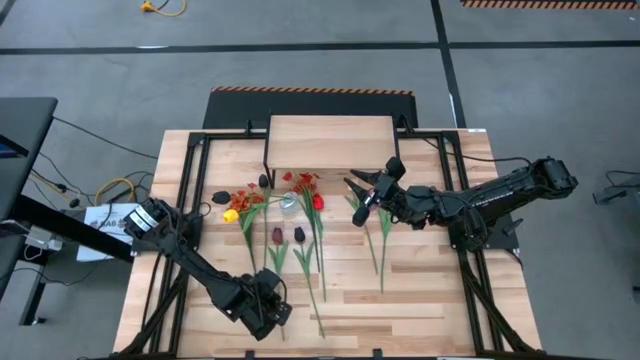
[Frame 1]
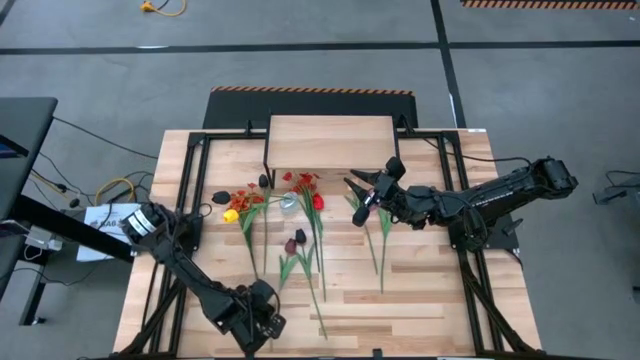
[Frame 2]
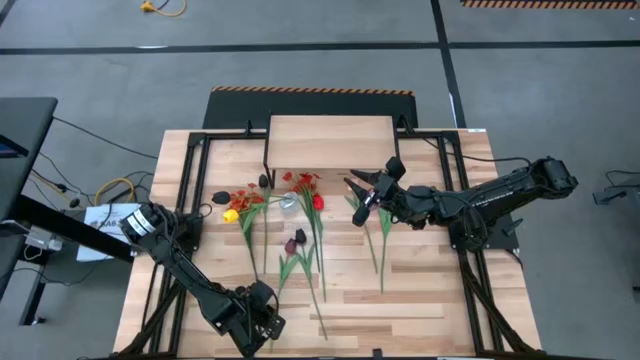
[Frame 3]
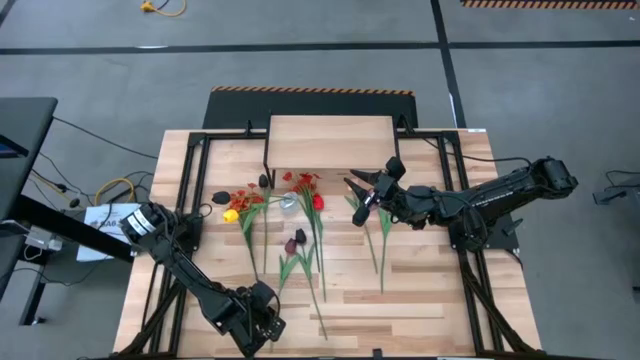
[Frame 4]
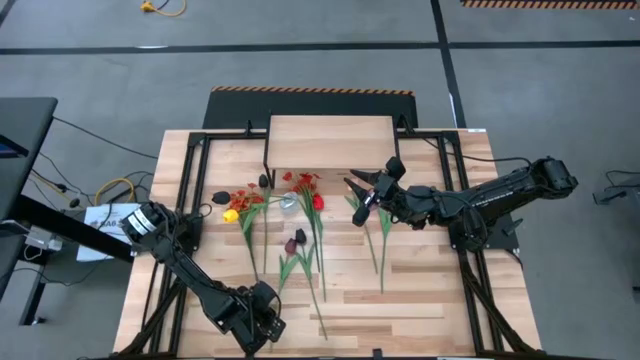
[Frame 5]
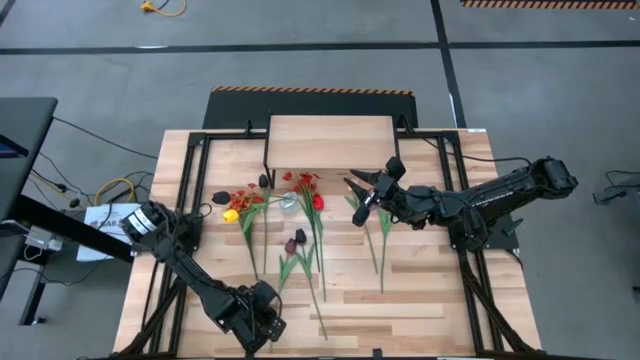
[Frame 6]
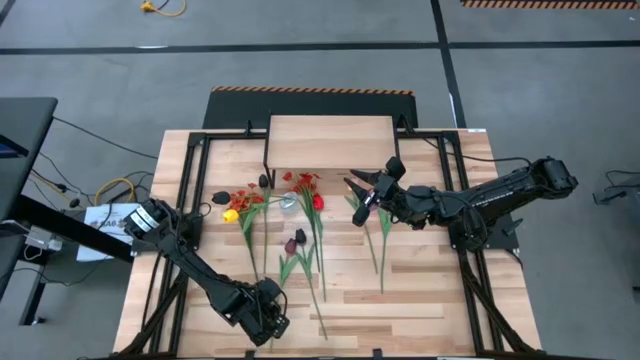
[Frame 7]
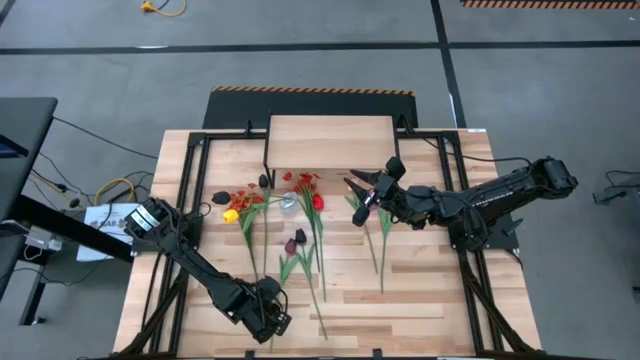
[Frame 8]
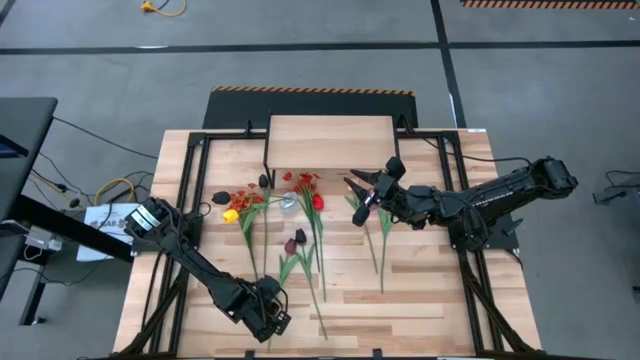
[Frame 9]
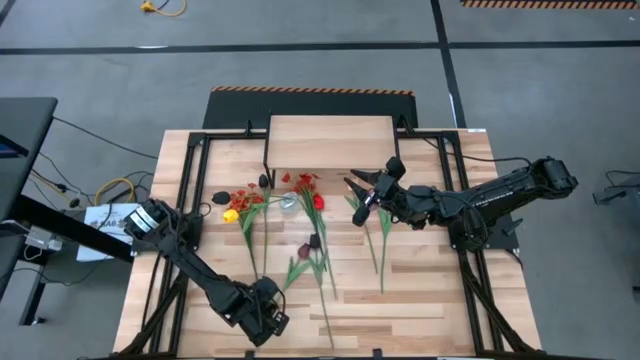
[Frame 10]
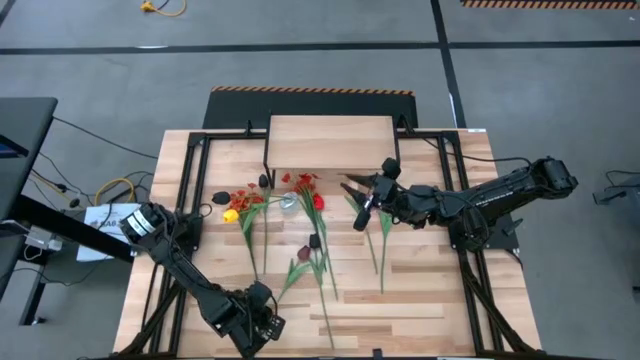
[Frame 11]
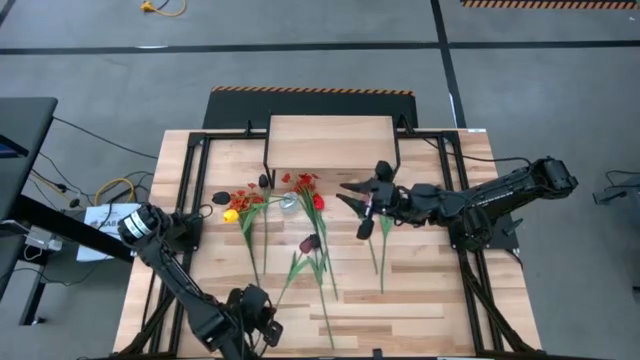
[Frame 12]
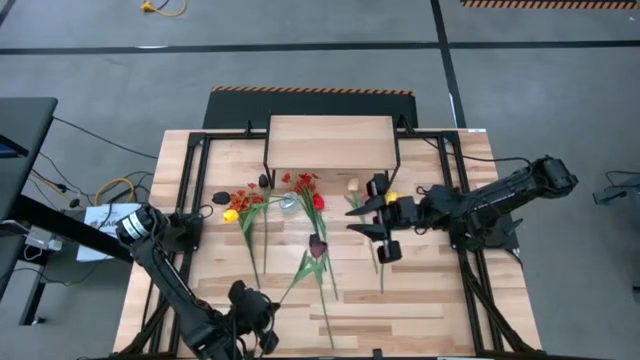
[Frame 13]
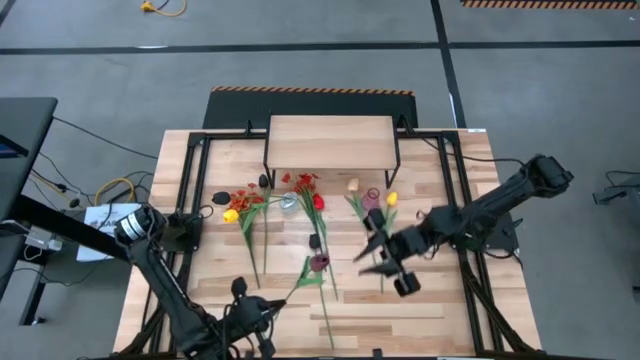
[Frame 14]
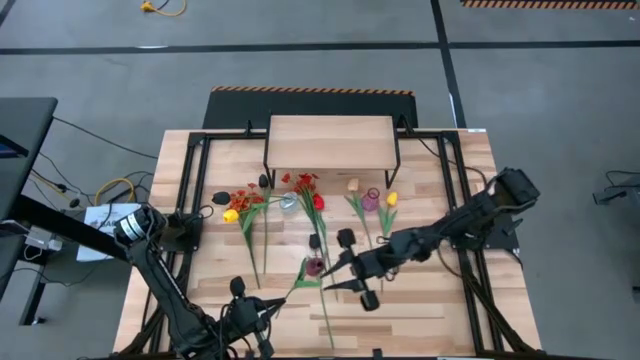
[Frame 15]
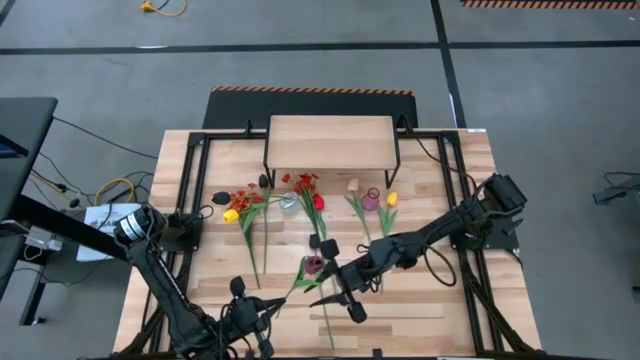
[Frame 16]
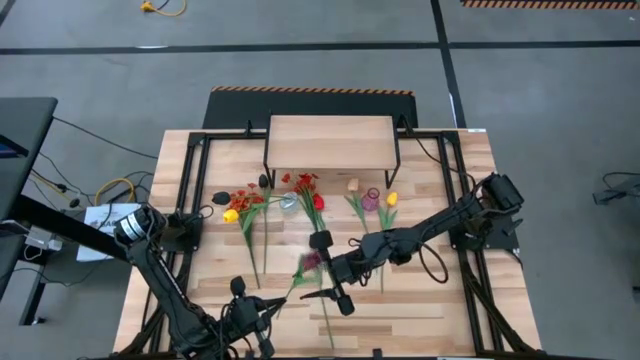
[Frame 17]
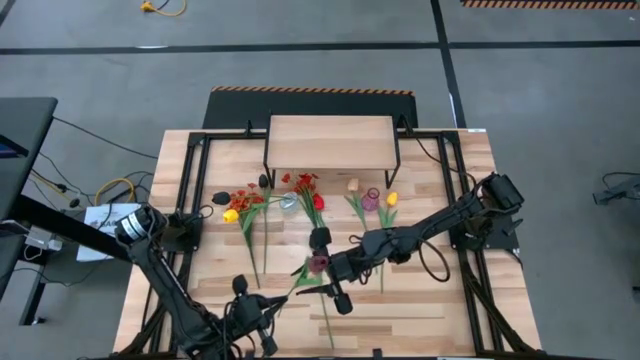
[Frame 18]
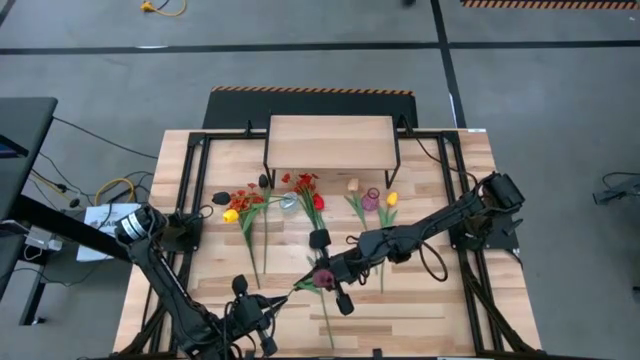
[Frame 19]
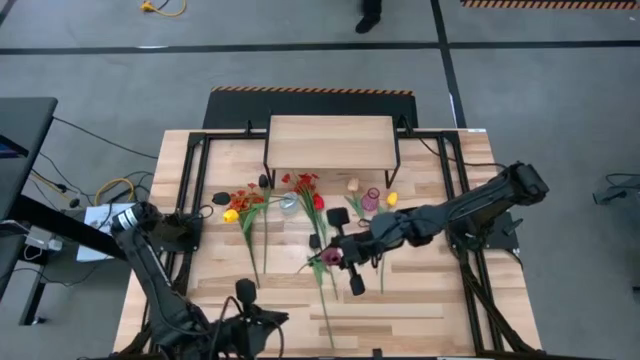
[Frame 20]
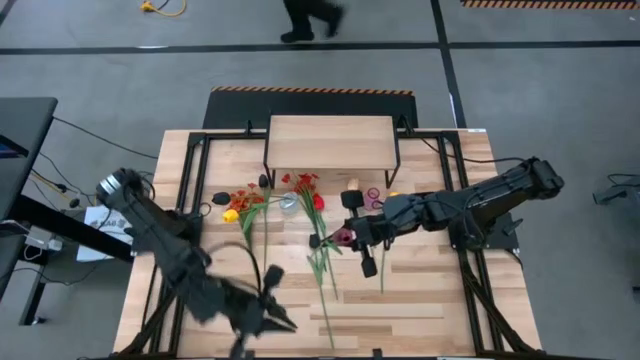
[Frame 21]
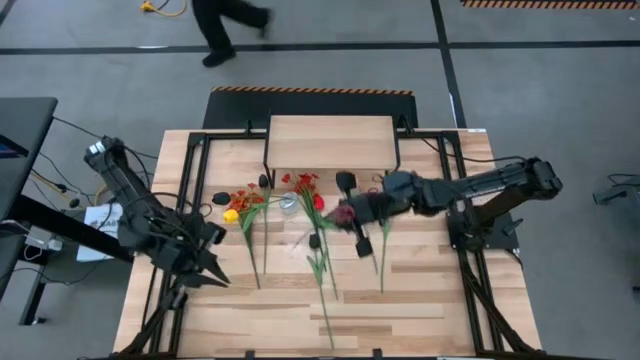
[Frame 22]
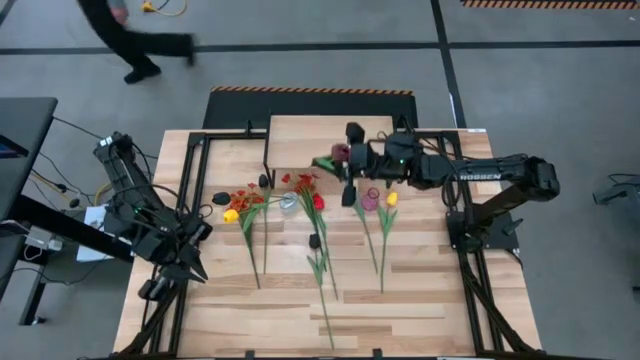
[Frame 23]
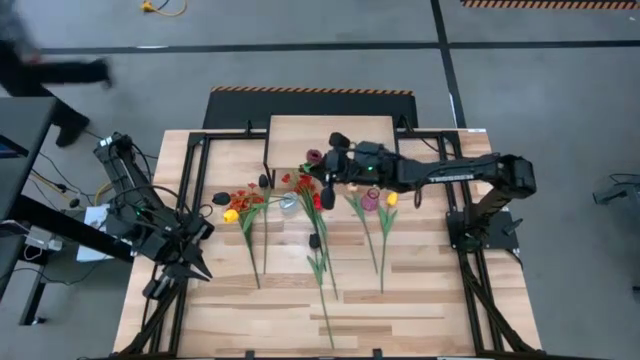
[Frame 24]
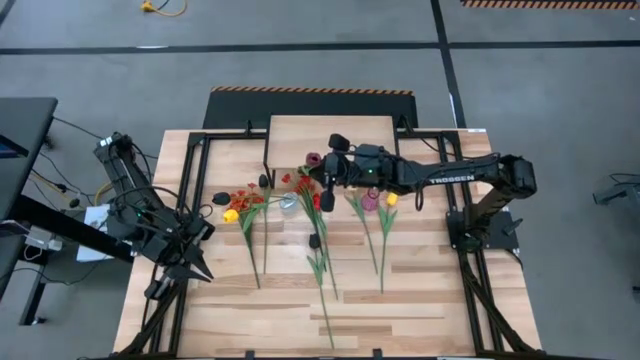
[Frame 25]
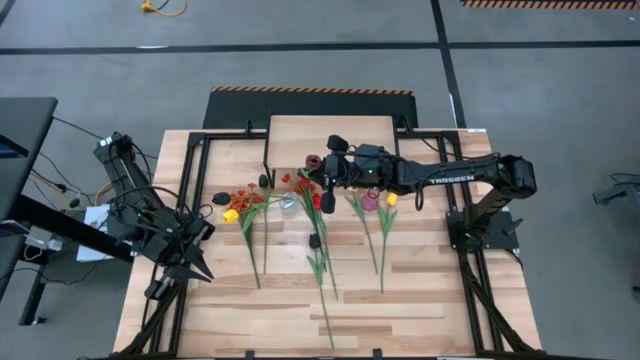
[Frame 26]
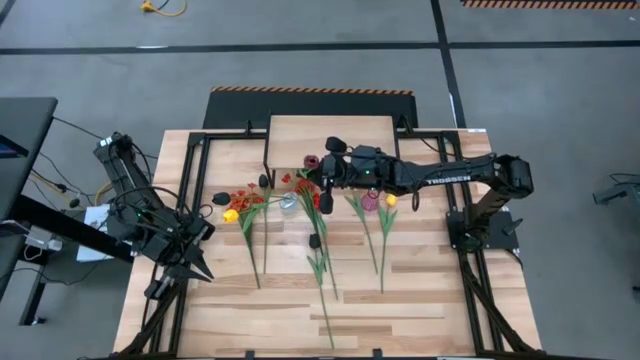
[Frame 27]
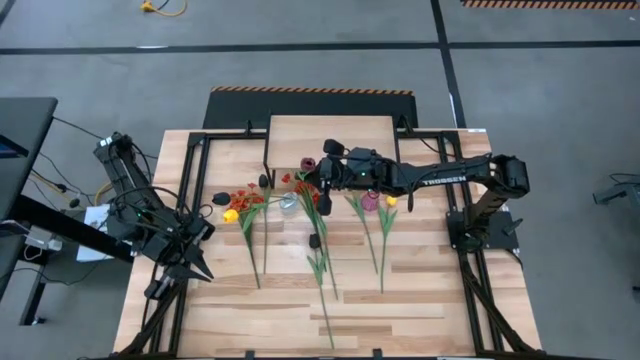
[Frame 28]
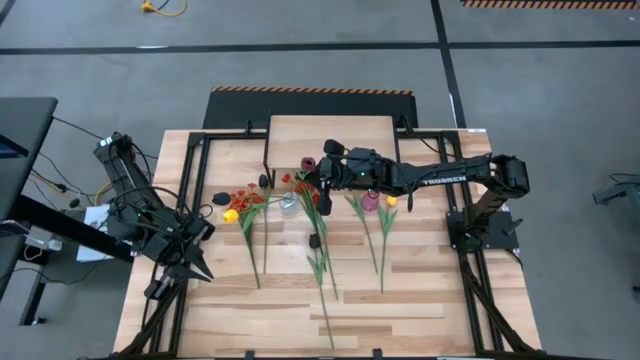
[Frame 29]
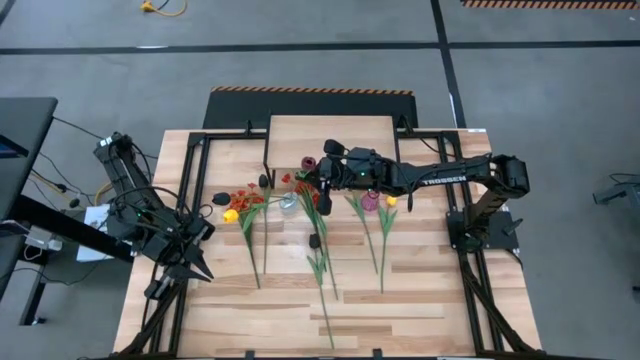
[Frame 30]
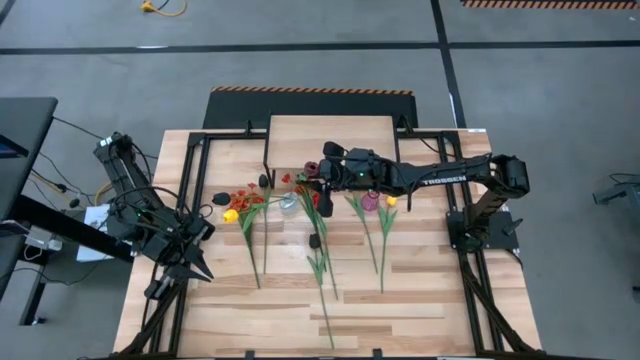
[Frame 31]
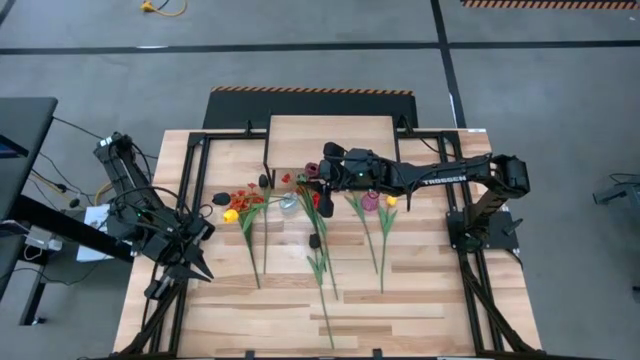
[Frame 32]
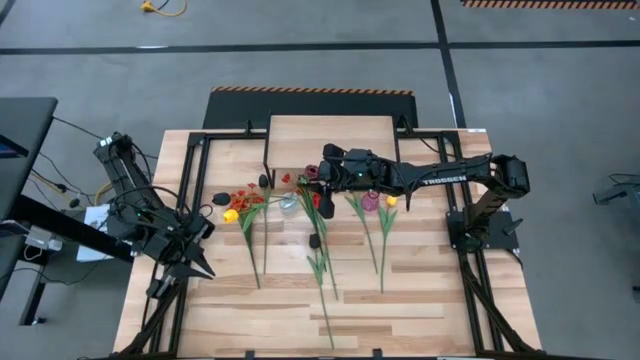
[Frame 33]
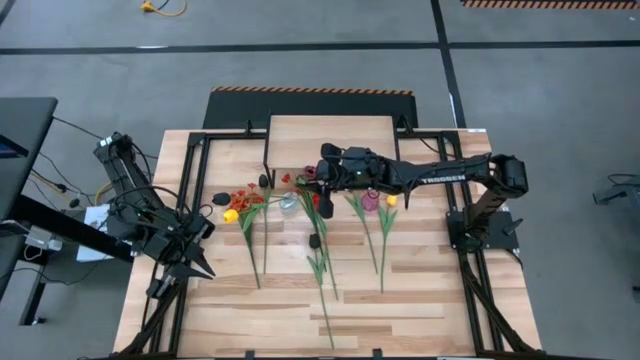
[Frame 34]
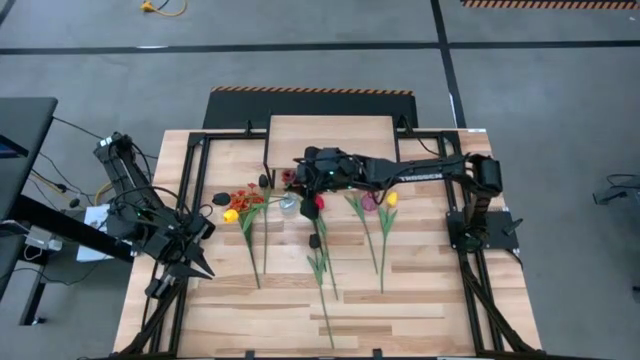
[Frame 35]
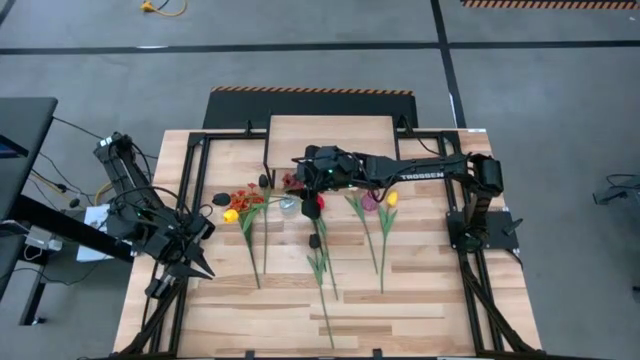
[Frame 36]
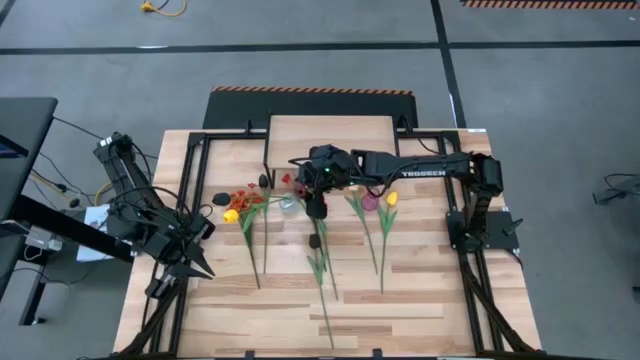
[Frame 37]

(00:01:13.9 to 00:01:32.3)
Task: Pick and place flowers into a vace then onto a shelf
Put the dark red flower into the transparent vase

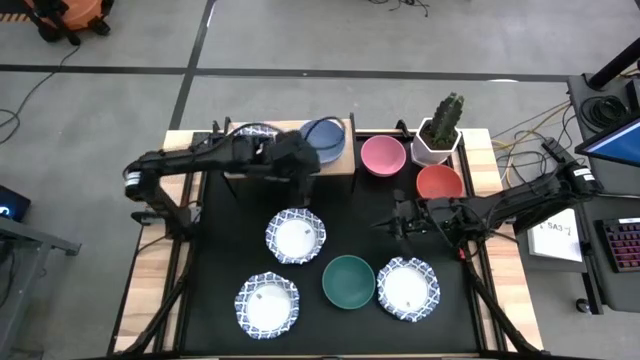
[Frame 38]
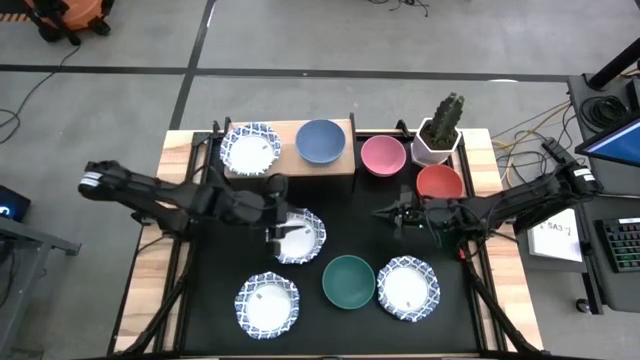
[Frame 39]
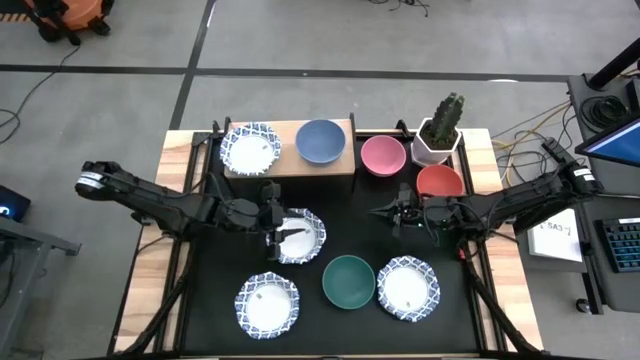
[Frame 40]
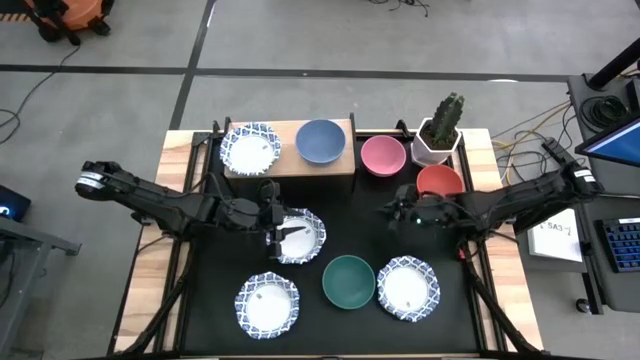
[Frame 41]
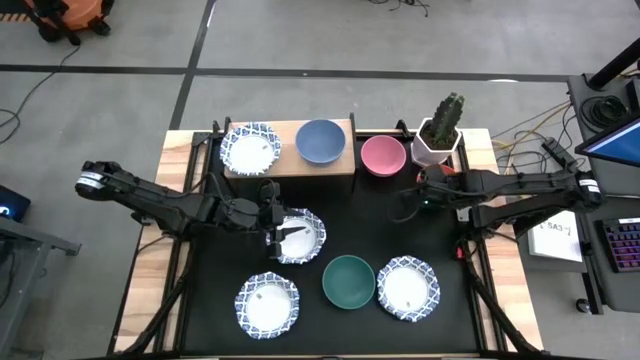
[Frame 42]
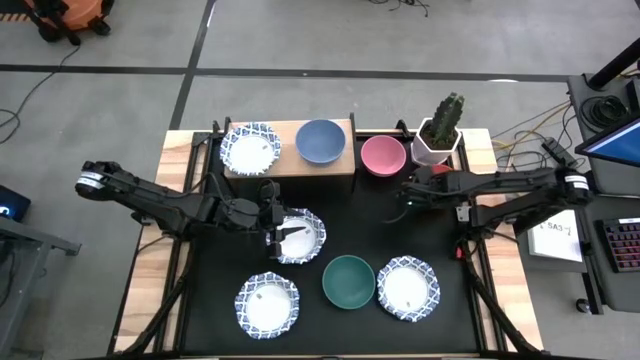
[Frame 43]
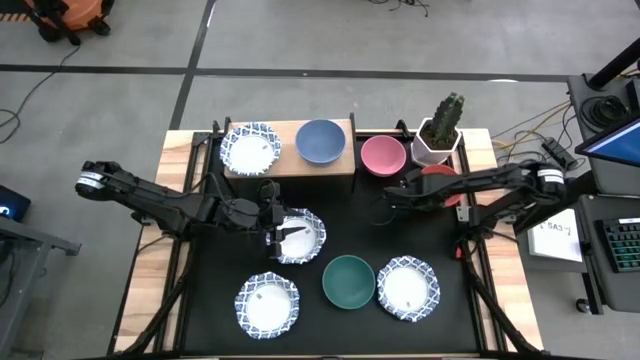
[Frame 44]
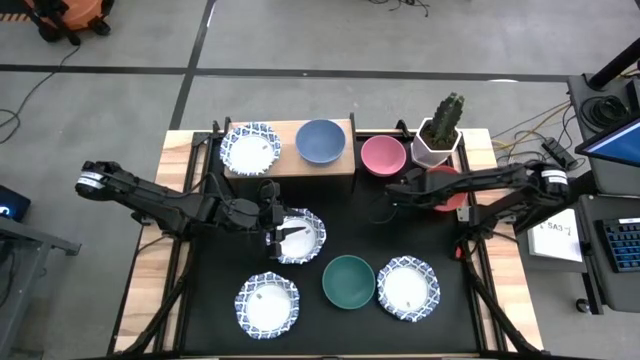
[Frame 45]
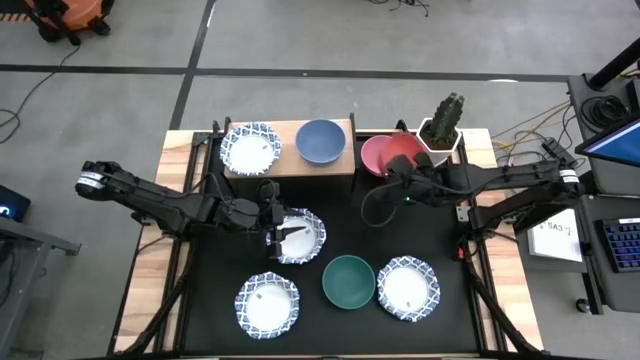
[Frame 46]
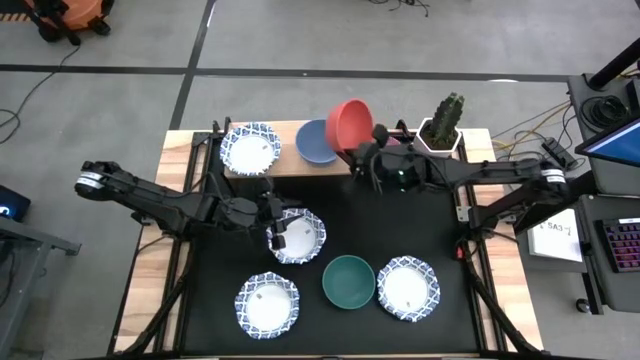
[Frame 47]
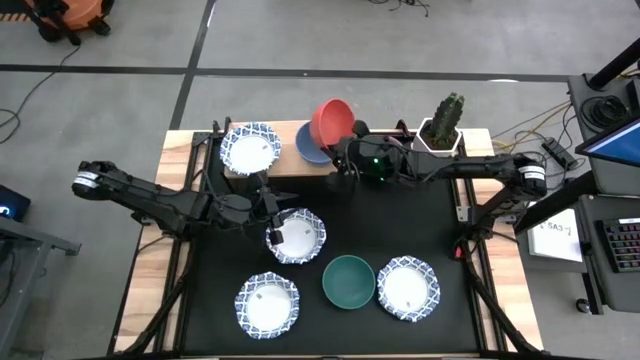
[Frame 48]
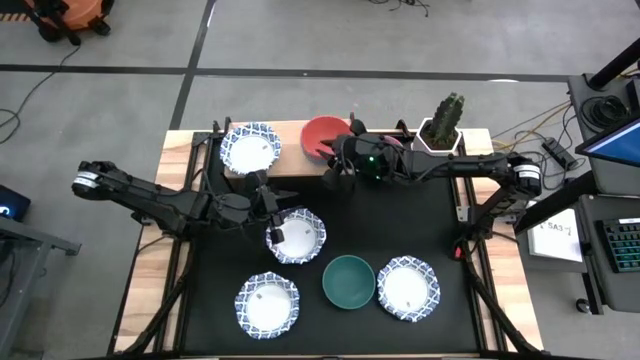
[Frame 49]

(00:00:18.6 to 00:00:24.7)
Task: Place and stack bowls onto a shelf
Stack the orange bowl on top of the blue bowl on the shelf
